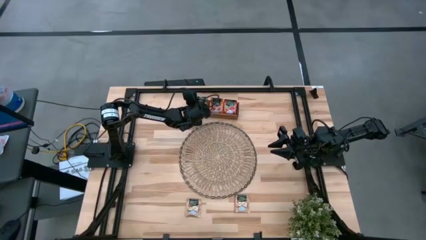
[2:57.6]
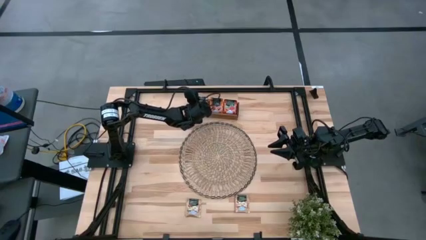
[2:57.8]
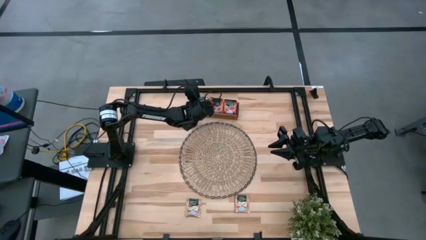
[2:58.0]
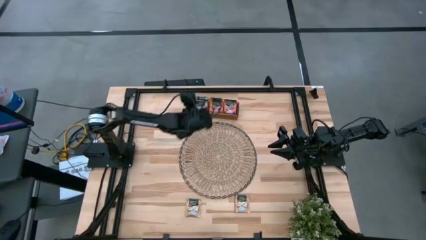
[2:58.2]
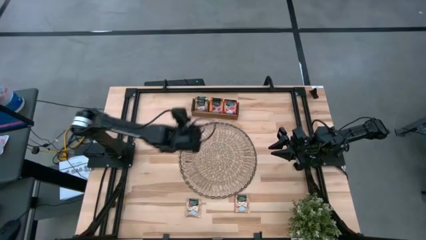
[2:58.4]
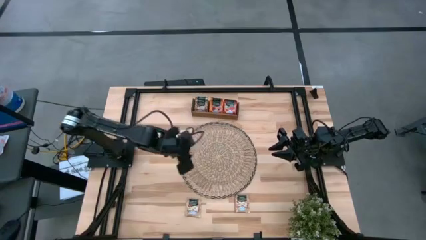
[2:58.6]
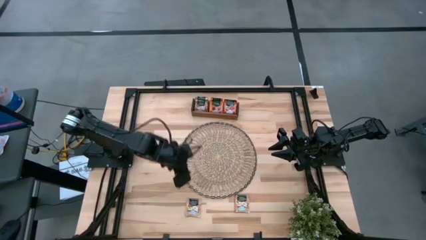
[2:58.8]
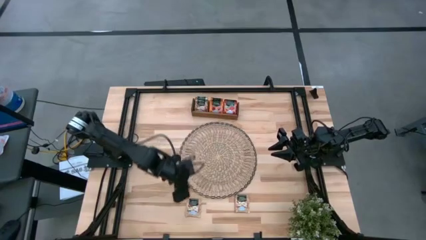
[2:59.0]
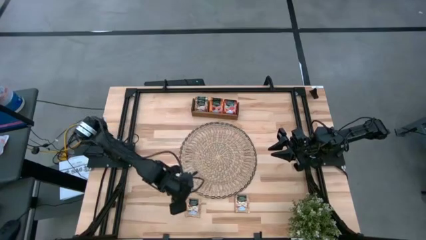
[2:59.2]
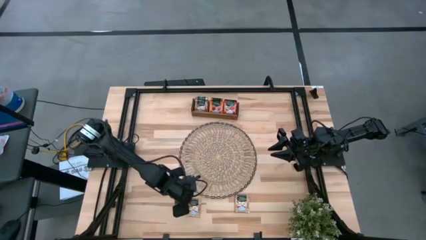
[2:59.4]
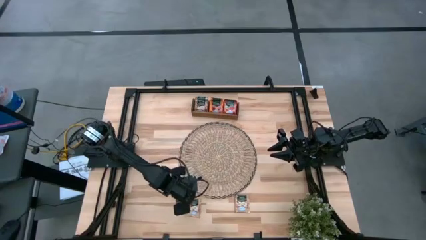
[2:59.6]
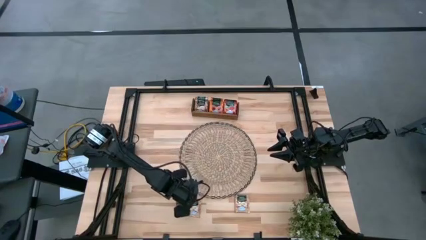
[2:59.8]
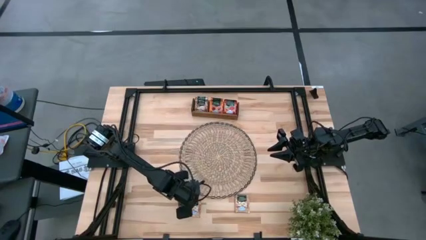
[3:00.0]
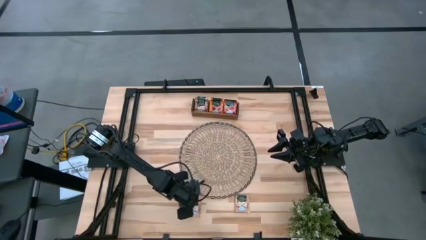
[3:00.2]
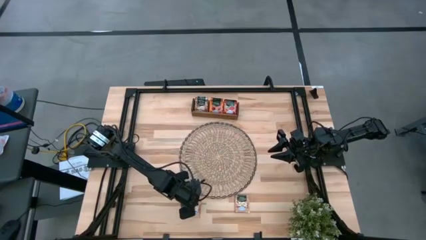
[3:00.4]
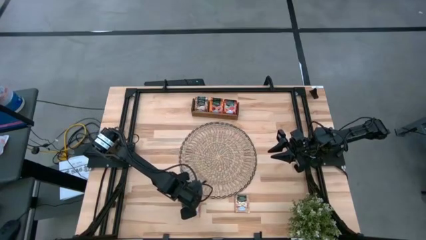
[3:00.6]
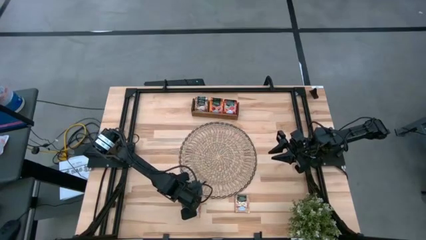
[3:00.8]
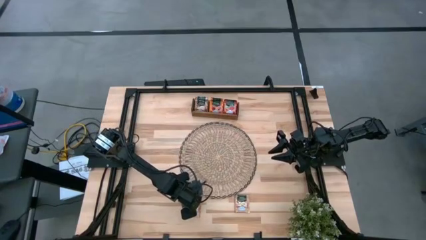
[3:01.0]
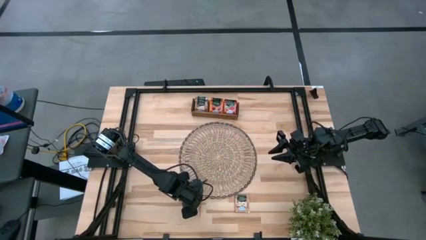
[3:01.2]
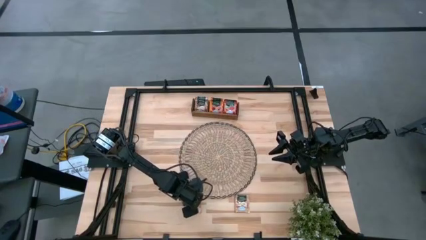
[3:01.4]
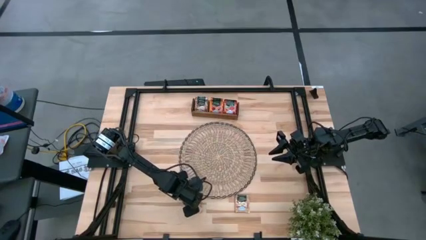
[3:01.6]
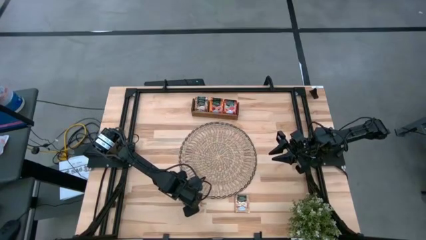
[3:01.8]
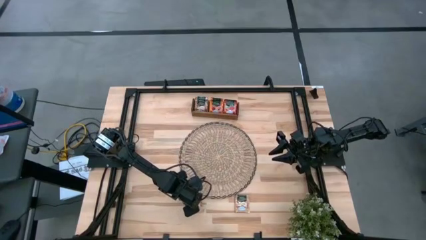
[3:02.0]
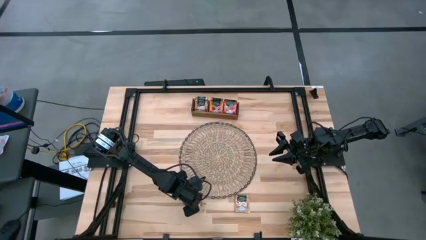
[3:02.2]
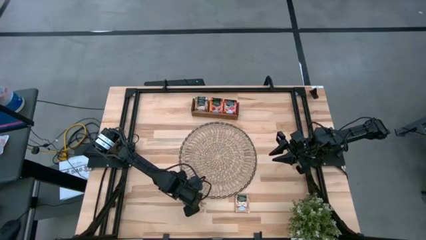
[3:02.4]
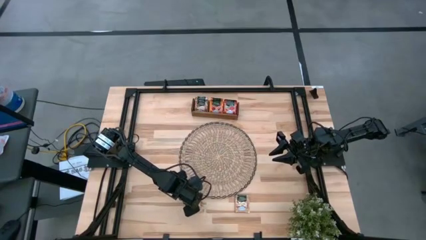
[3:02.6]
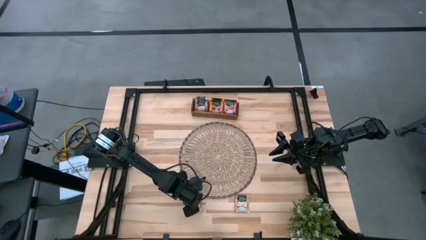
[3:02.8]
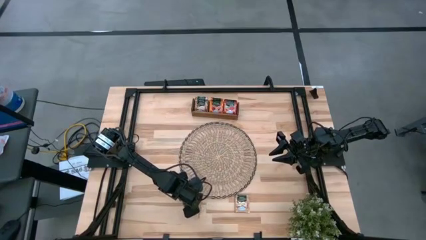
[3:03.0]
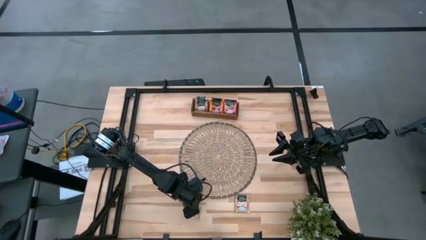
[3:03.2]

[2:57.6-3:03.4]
Task: Pick & Place Tea
Put the brown tea bag into the left section of the wooden organizer

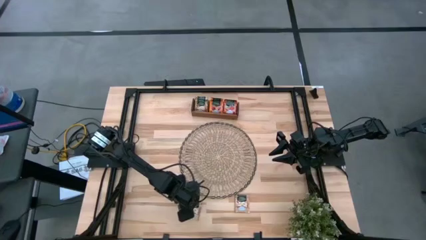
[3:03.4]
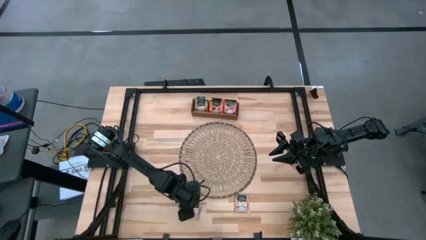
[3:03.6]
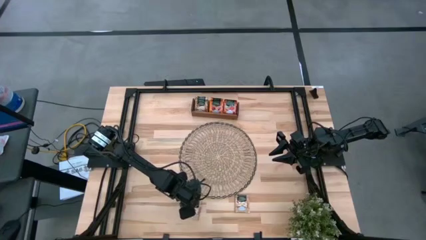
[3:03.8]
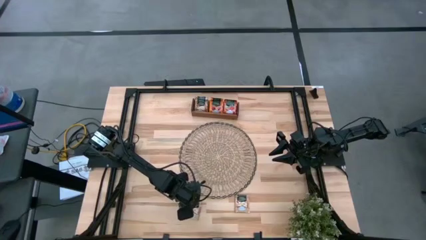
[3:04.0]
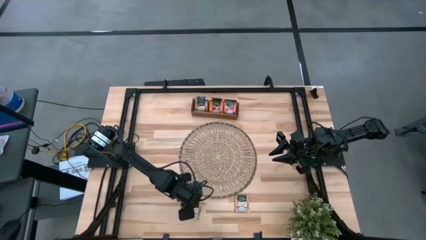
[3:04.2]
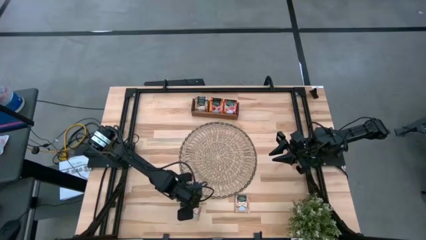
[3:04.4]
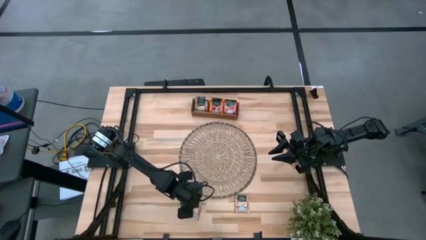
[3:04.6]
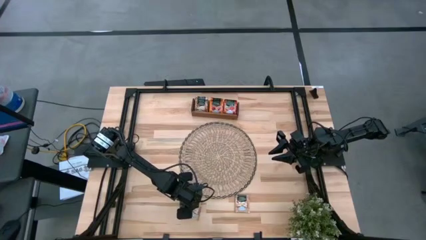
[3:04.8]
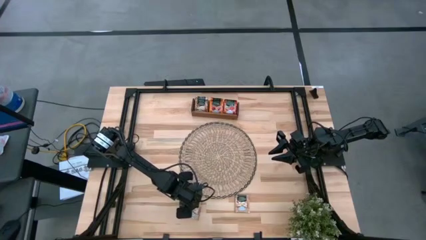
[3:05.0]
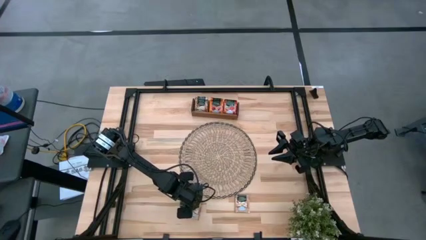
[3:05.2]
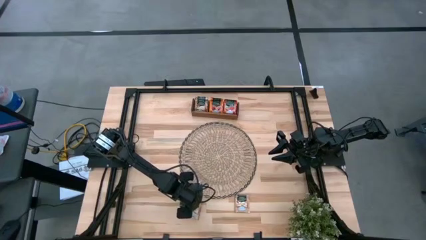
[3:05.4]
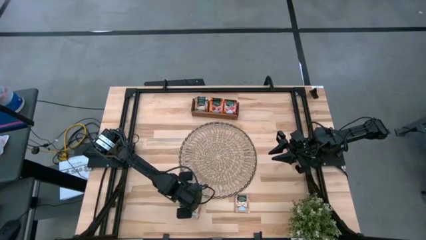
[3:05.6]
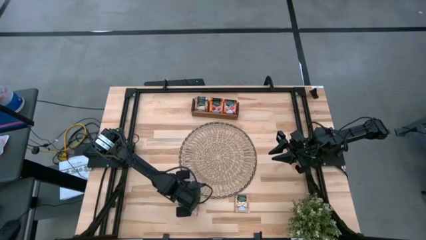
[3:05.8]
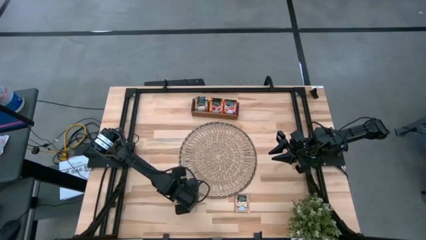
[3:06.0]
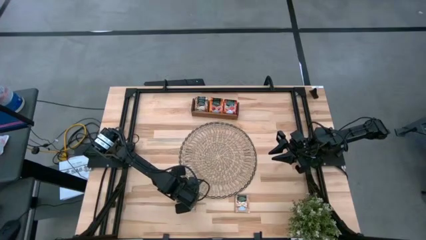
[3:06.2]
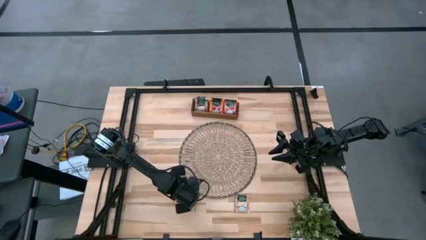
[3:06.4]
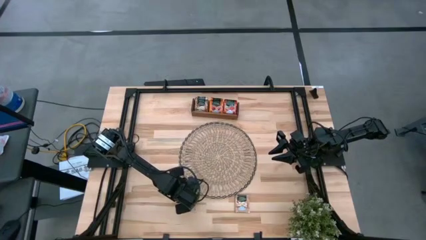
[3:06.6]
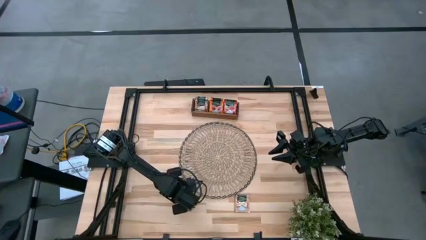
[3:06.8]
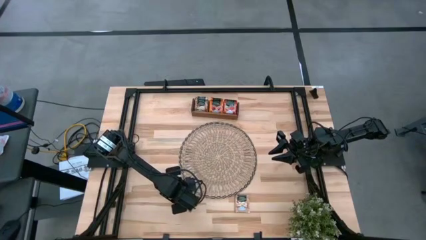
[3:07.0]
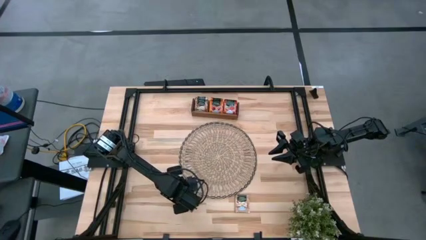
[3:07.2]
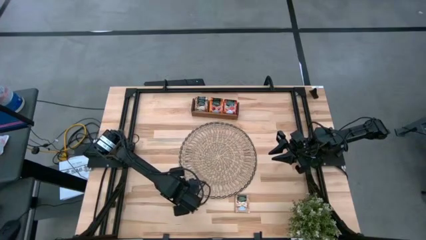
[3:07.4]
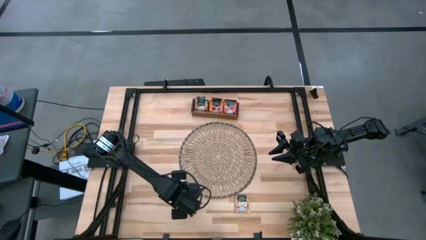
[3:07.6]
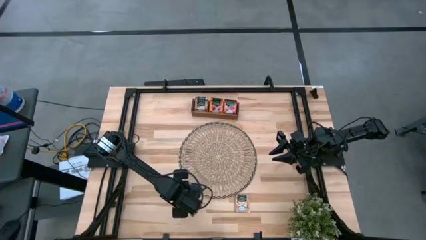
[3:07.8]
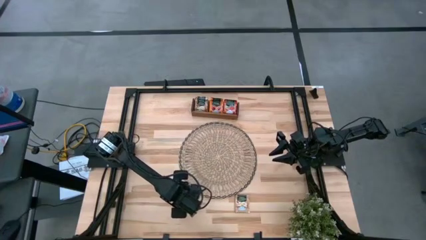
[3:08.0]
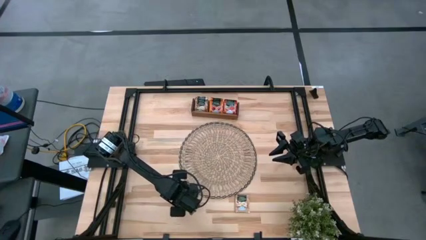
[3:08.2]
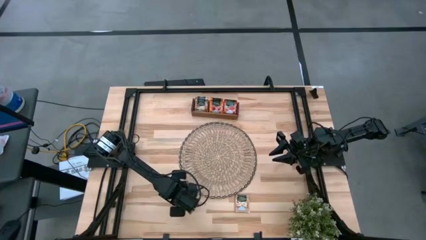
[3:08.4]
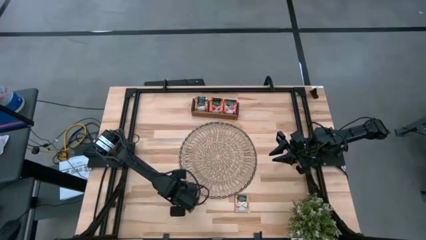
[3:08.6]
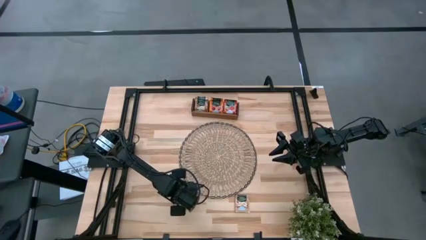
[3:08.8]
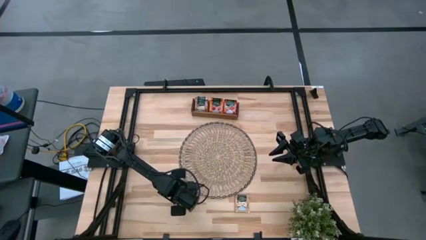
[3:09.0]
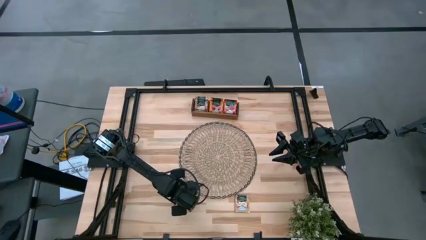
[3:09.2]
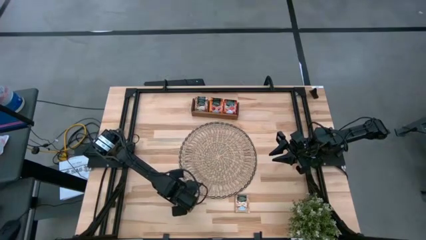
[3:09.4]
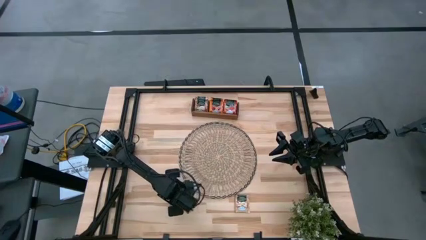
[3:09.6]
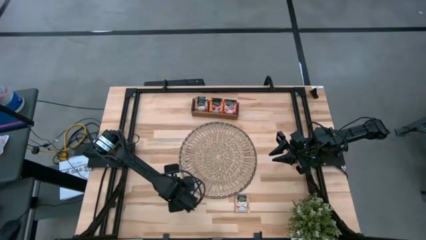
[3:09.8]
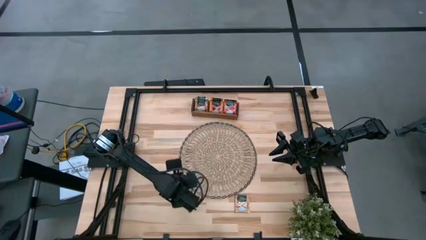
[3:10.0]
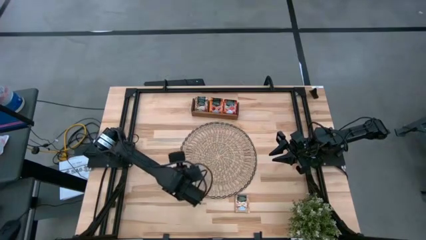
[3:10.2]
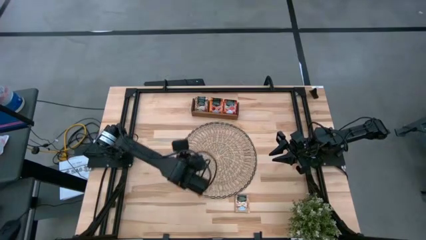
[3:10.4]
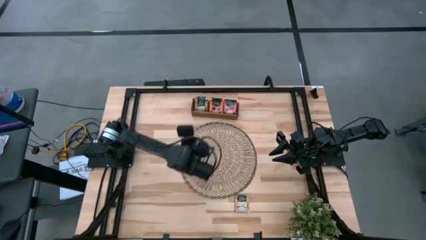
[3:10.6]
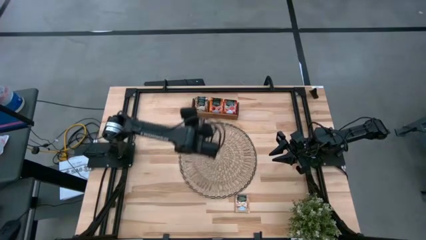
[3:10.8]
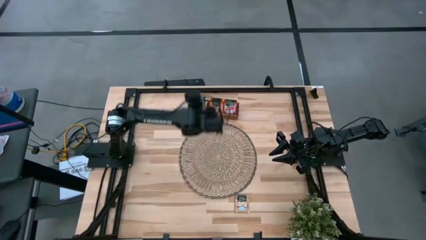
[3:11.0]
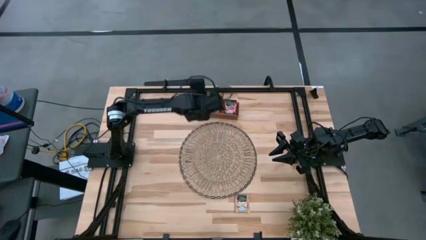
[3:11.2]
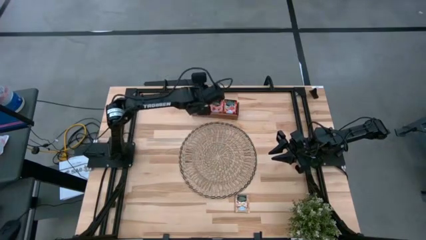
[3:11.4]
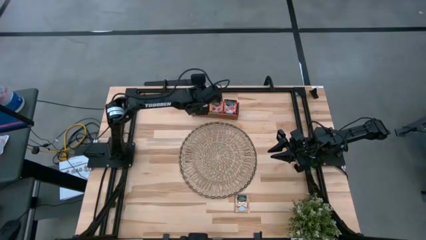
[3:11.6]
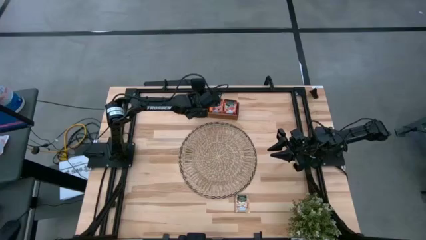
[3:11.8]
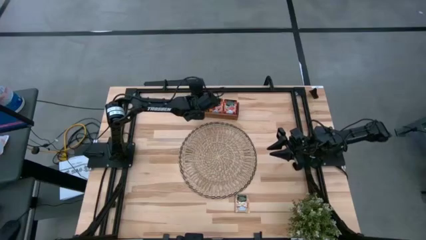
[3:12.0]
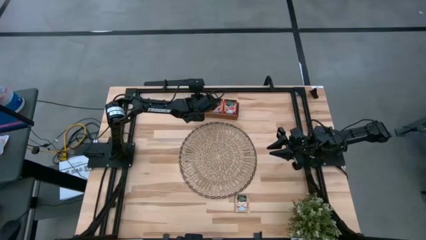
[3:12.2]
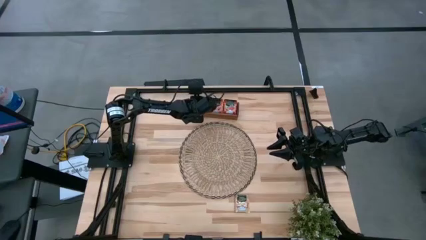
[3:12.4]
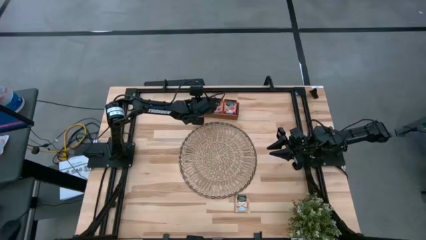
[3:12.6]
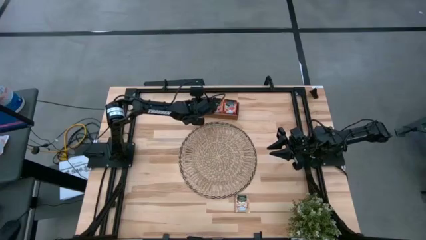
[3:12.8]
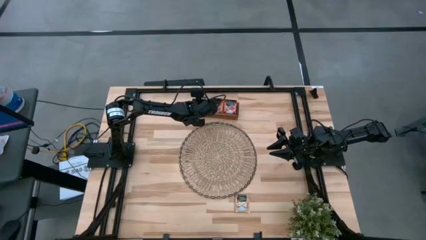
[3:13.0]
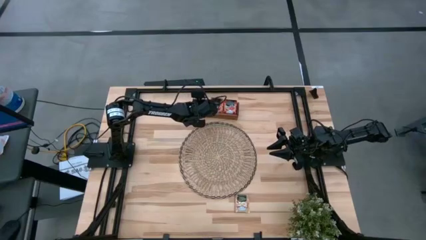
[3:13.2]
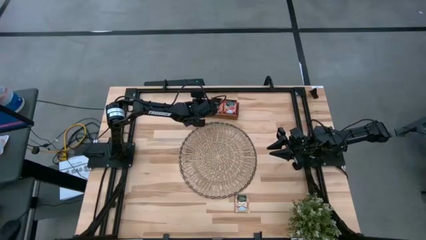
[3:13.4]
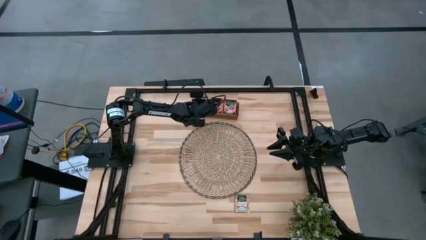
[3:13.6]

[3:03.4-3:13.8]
Put the brown tea bag into the left section of the wooden organizer
